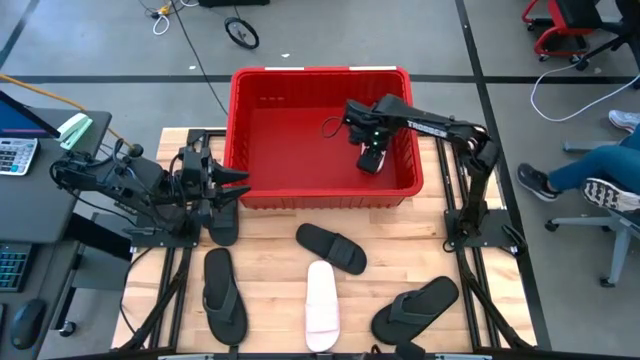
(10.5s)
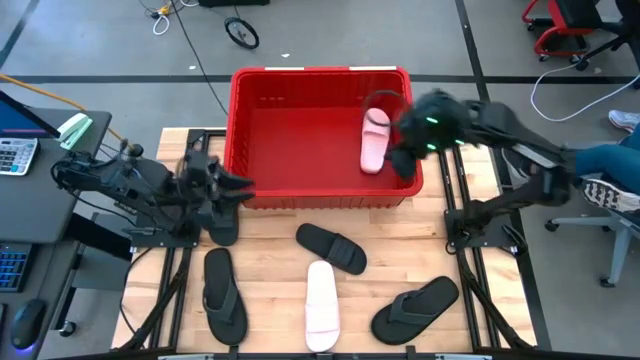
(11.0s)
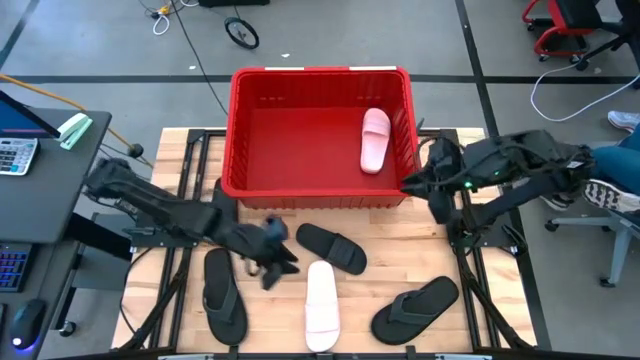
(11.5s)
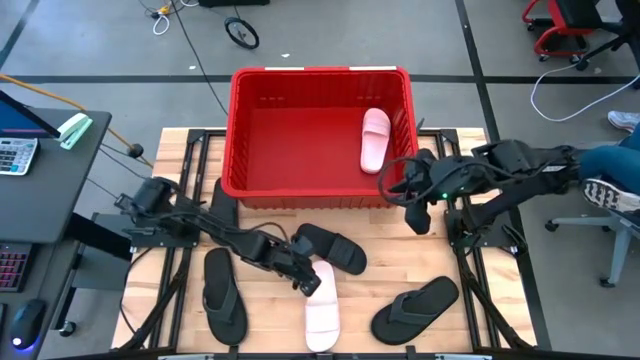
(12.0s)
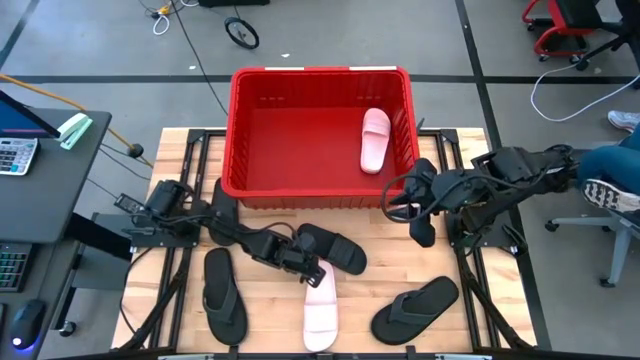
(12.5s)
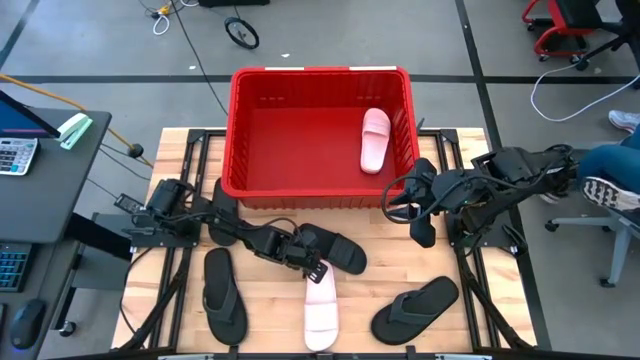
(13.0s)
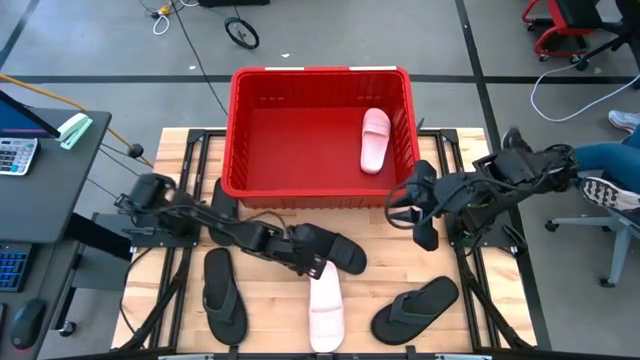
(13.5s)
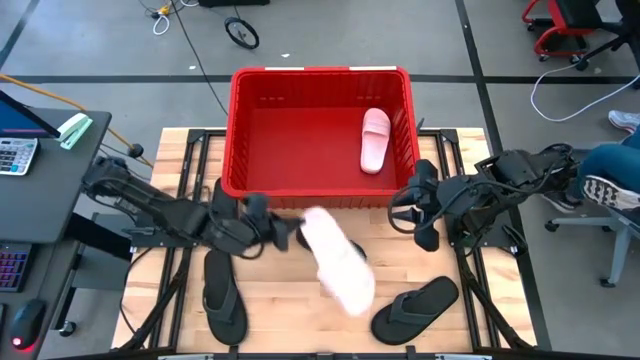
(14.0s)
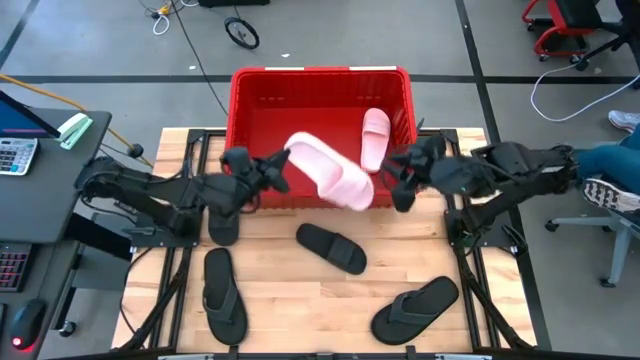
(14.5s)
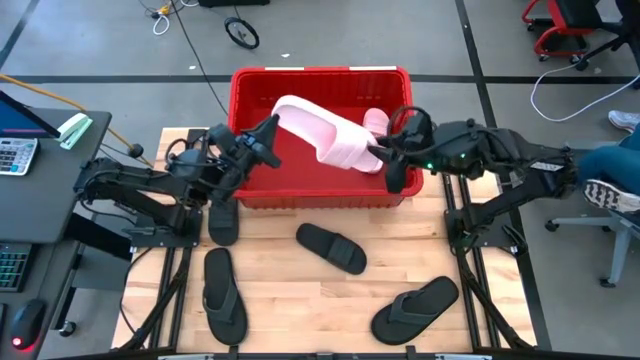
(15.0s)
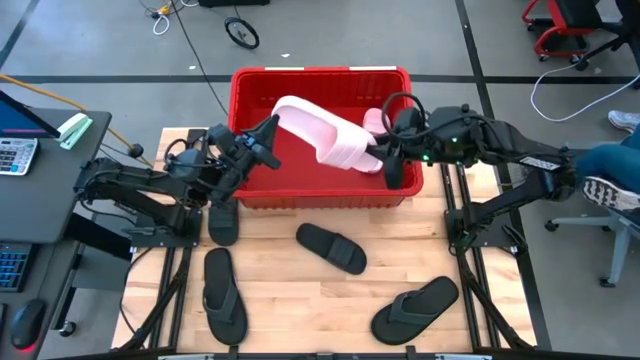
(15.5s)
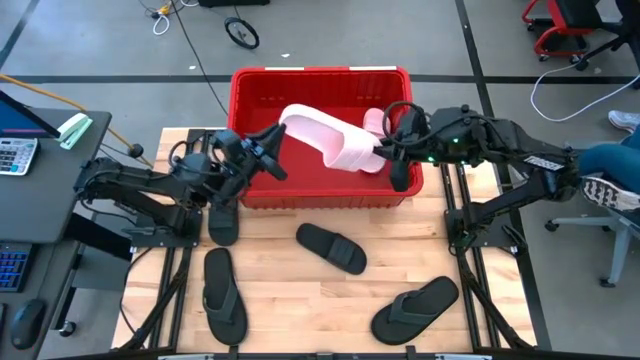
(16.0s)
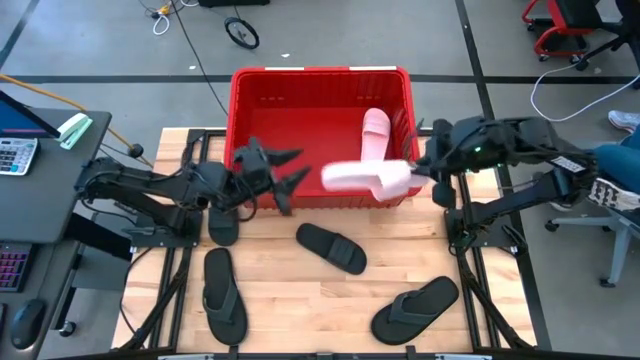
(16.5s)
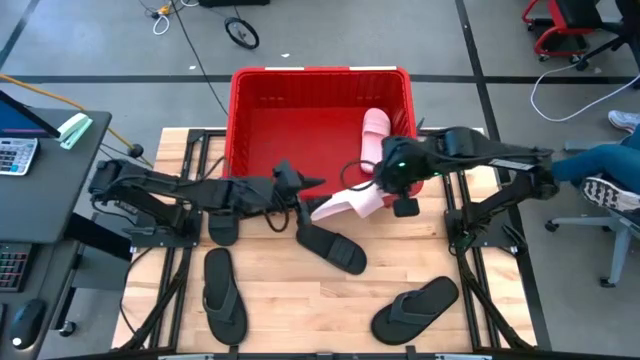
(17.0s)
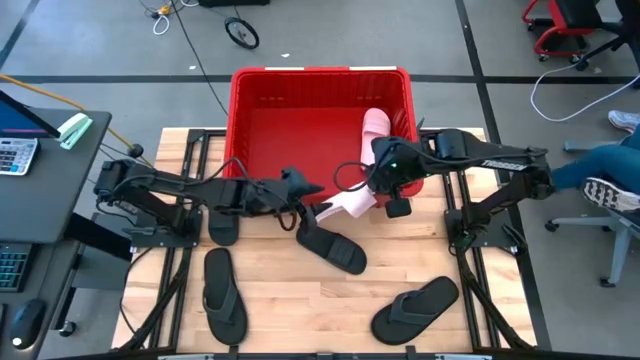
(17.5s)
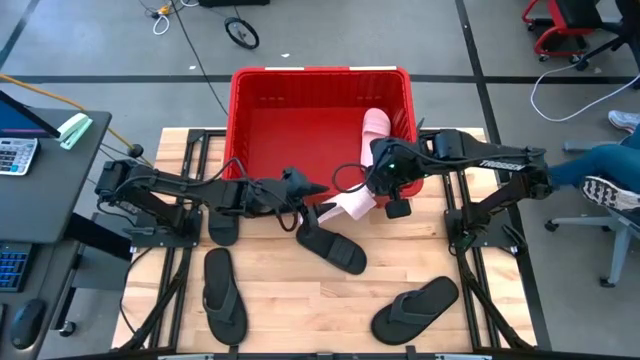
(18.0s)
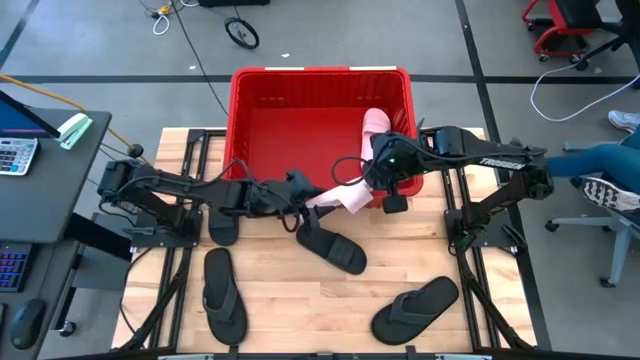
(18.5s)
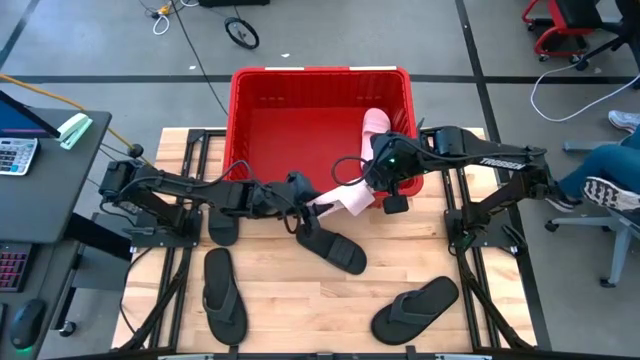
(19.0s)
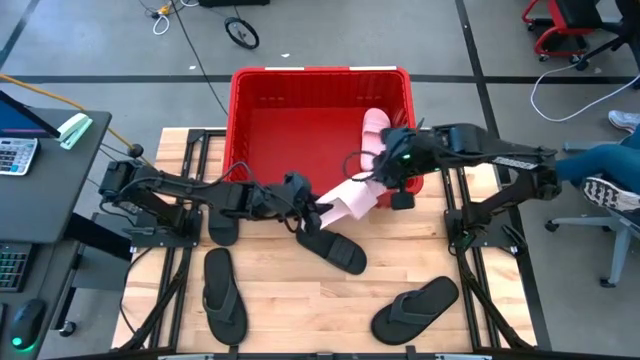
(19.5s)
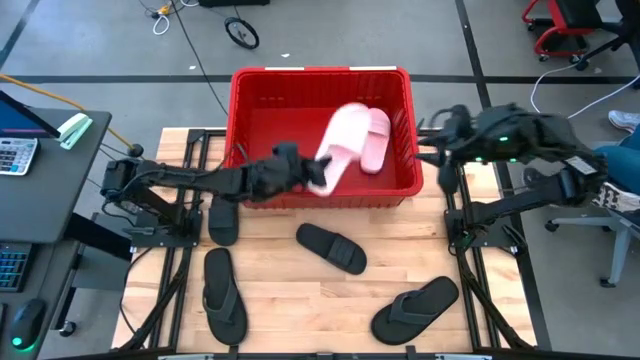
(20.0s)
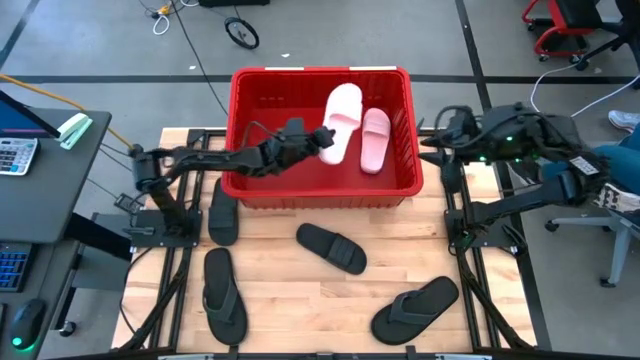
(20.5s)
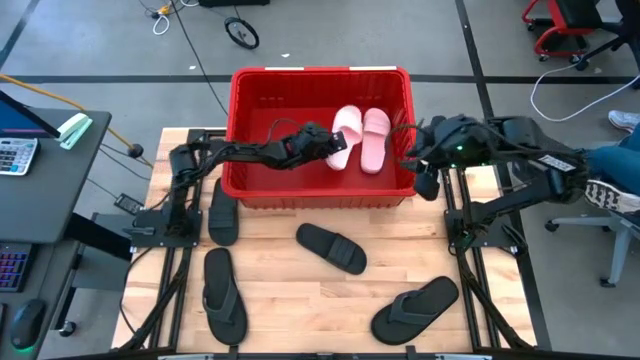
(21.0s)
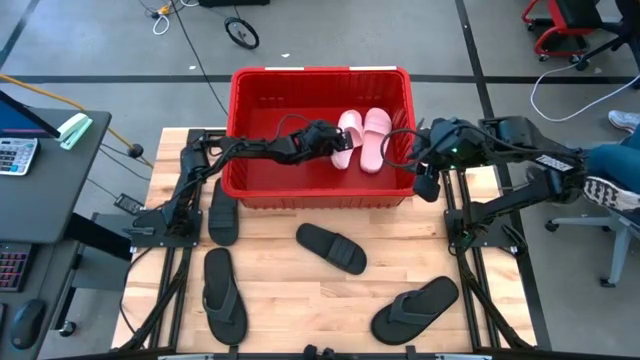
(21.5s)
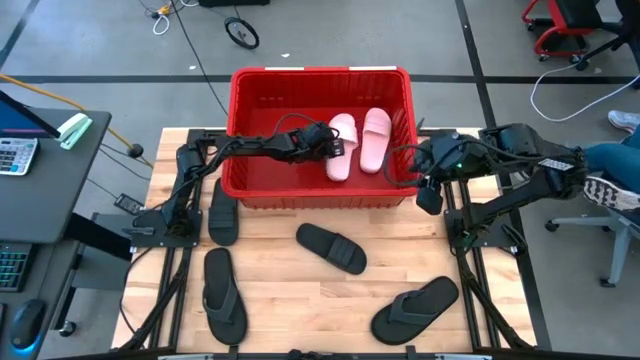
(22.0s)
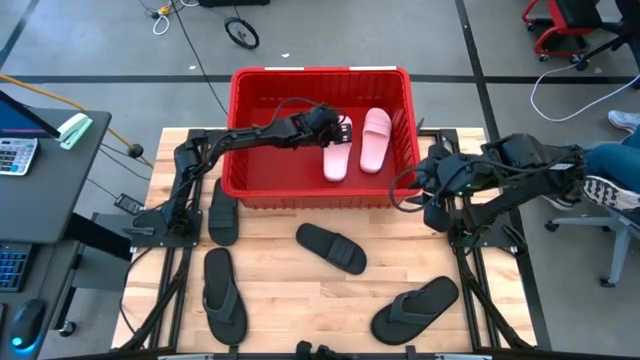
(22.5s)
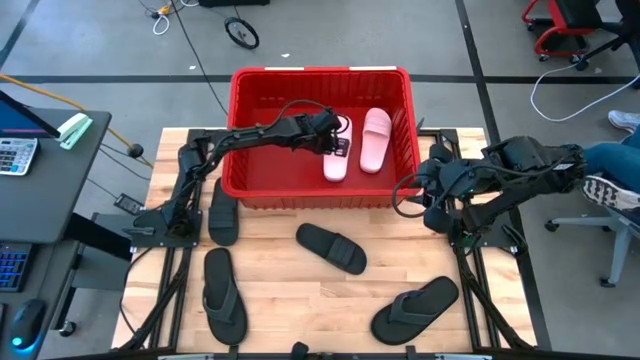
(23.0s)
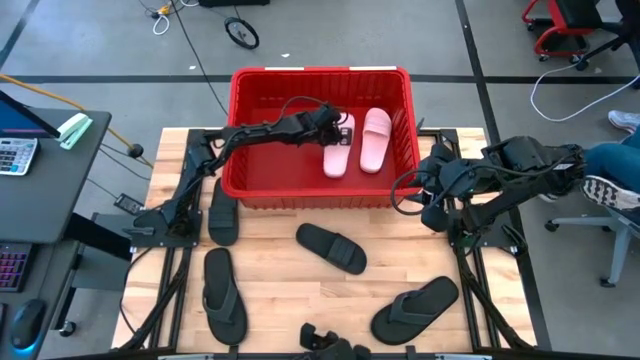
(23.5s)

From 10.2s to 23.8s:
Task: Pick and place slides into bin
Put the pink slipper into the red bin

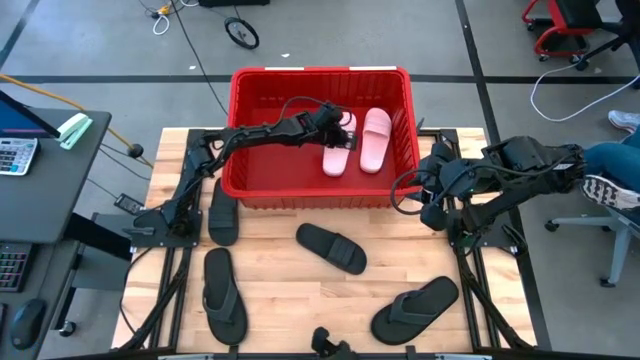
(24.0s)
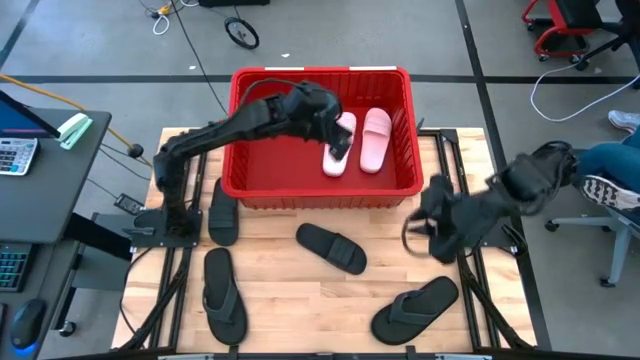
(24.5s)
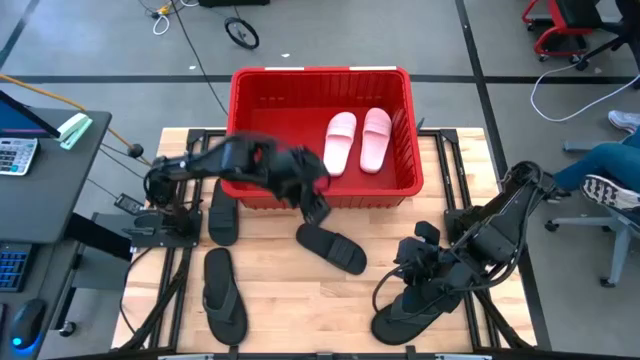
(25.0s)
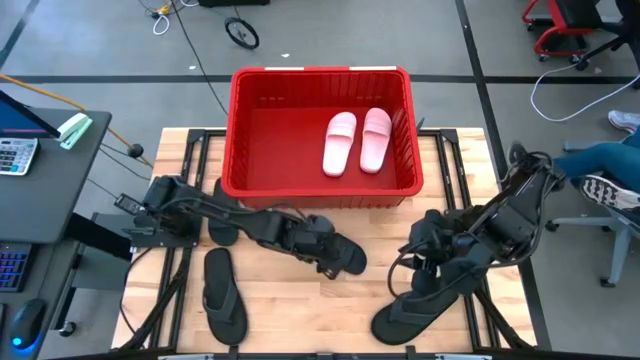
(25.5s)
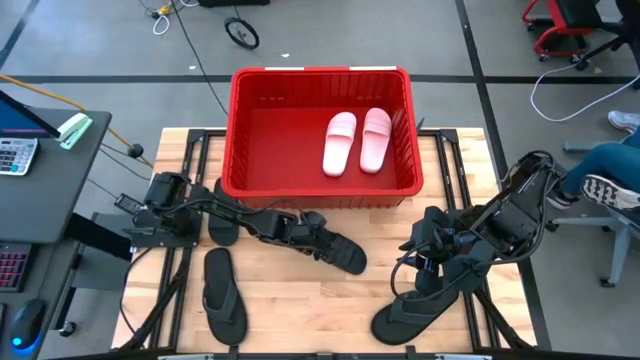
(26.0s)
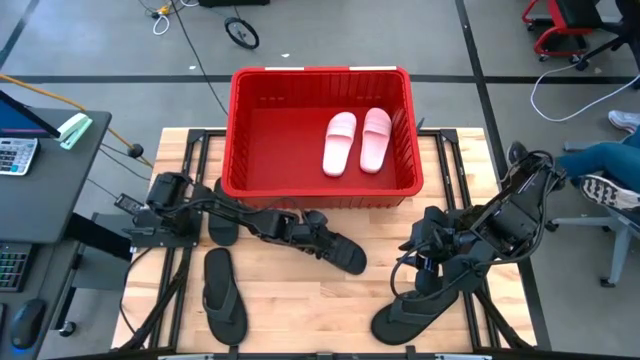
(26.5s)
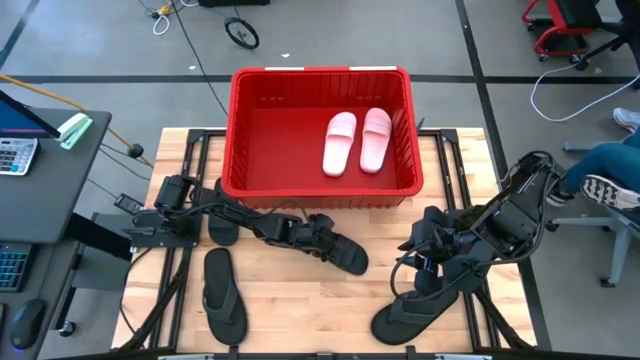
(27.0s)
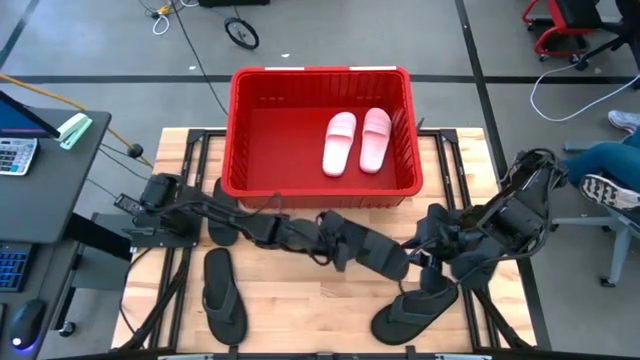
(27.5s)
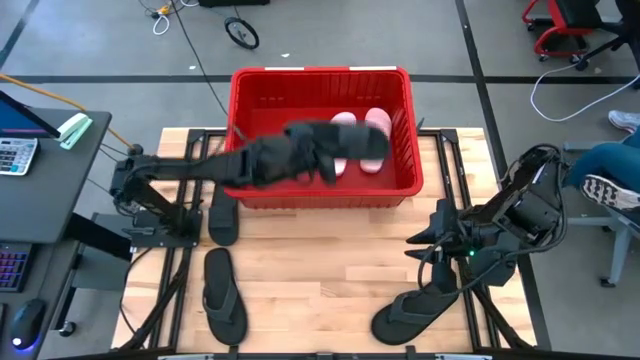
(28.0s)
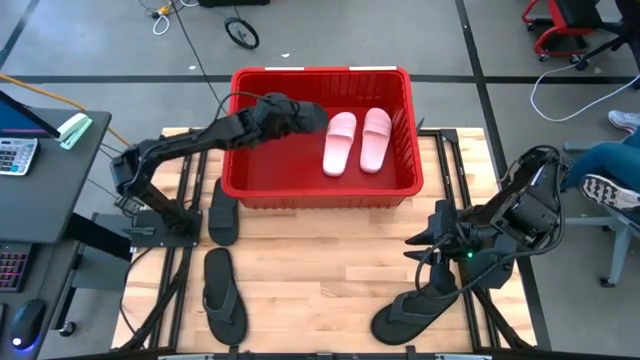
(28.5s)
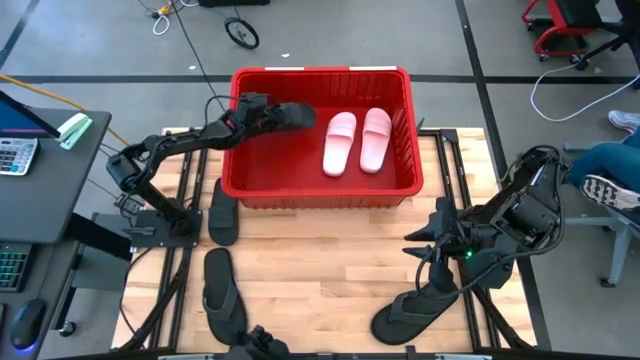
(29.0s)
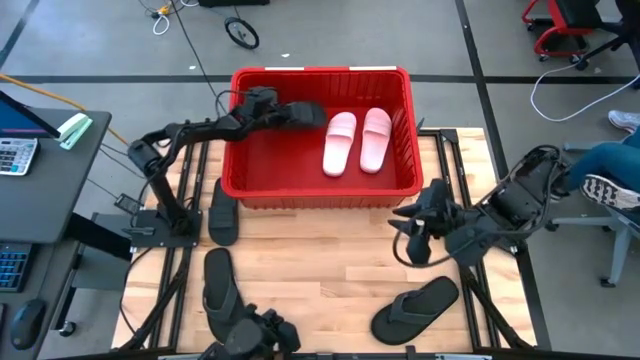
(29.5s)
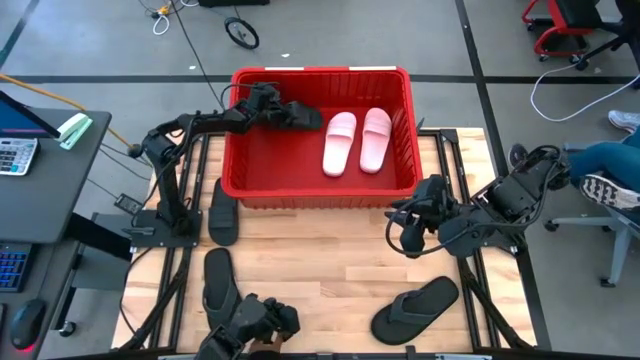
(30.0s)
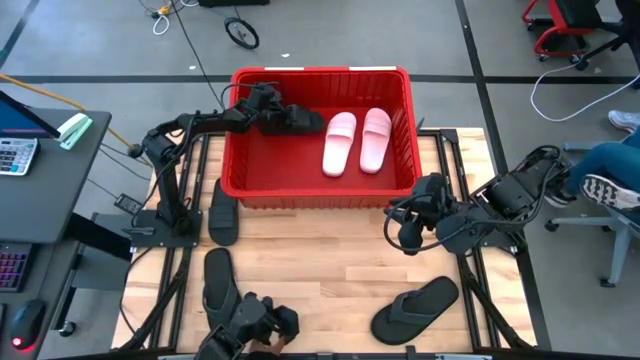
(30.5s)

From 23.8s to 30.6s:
Put the right black slipper into the red bin

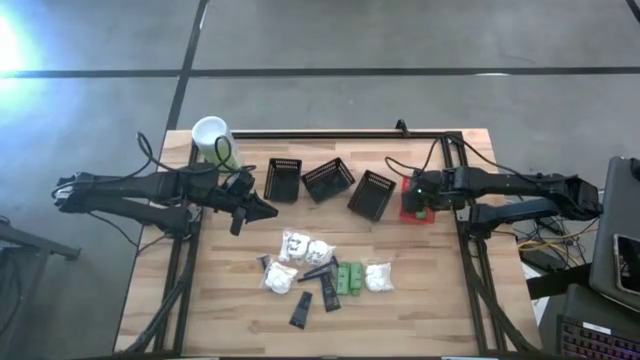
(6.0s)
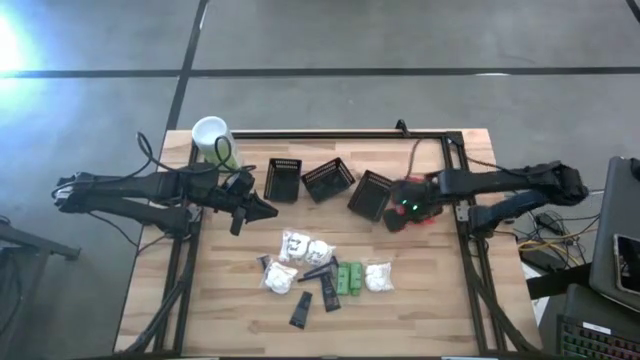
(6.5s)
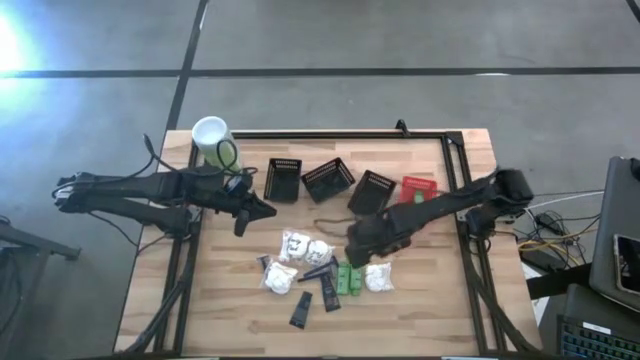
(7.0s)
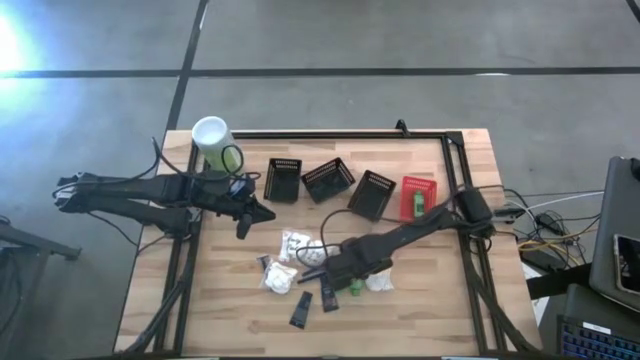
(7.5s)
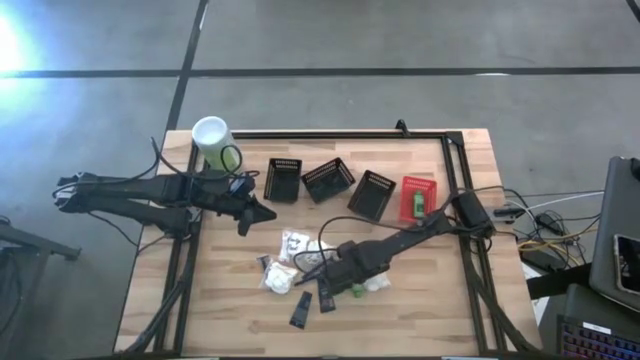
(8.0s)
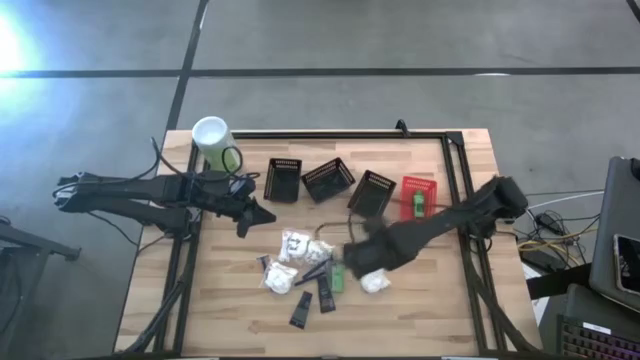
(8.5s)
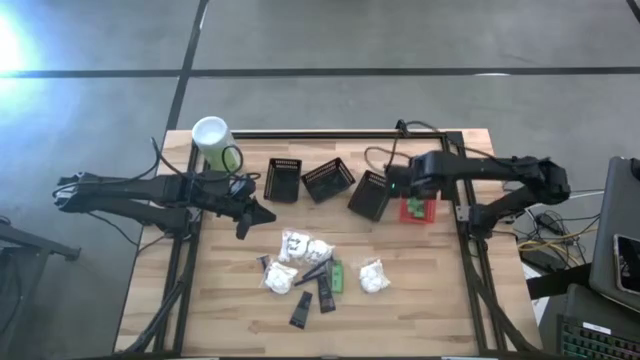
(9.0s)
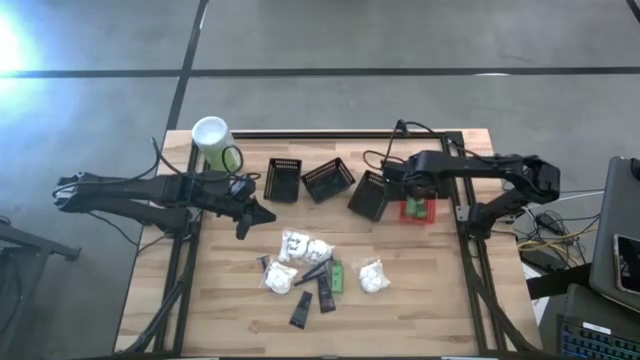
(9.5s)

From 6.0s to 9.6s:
Task: Pick & Place Travel size toiletries
Put the right shampoo into the red bin
